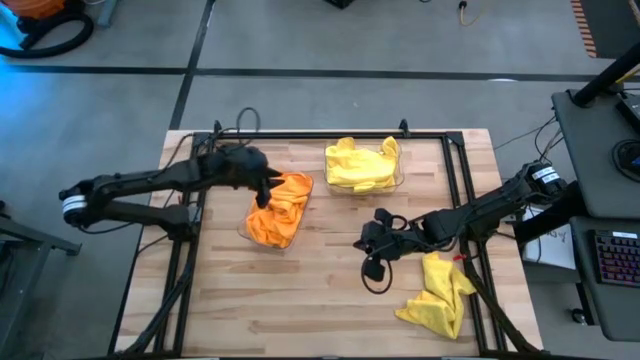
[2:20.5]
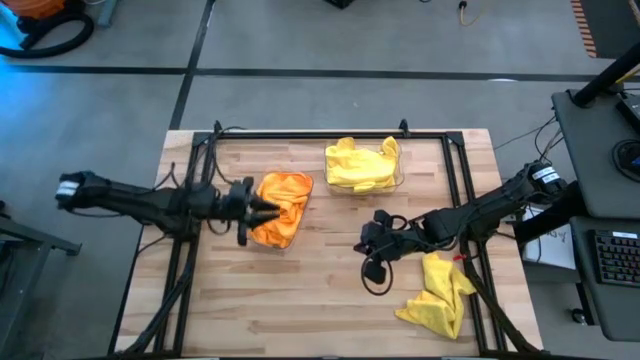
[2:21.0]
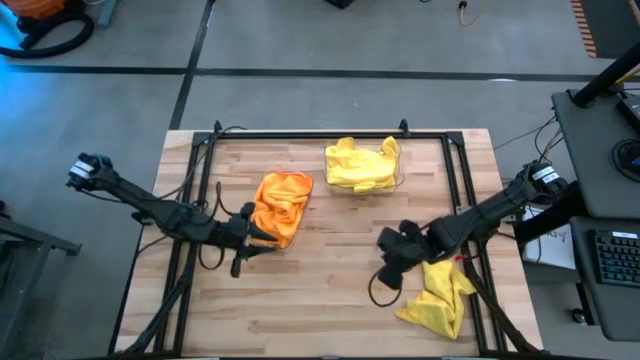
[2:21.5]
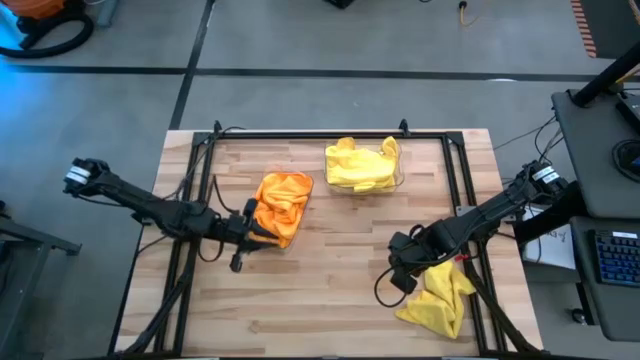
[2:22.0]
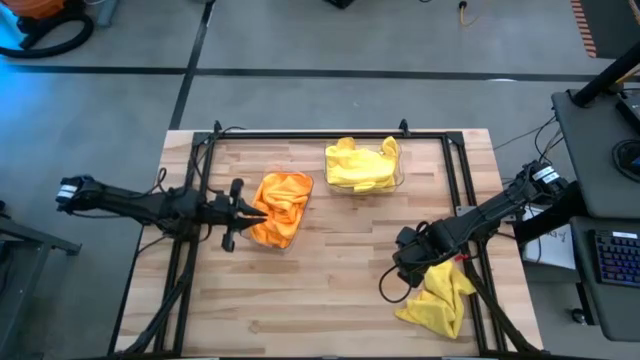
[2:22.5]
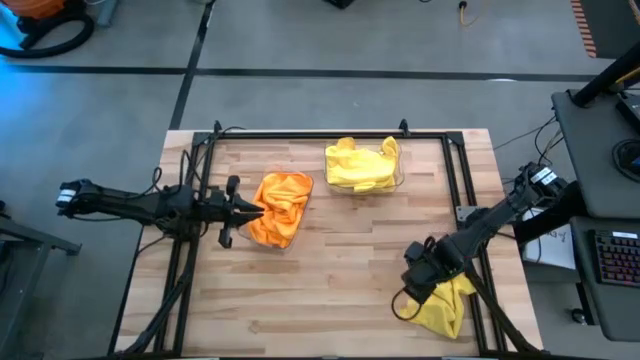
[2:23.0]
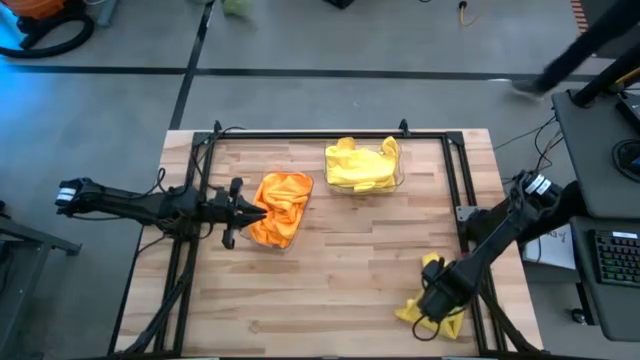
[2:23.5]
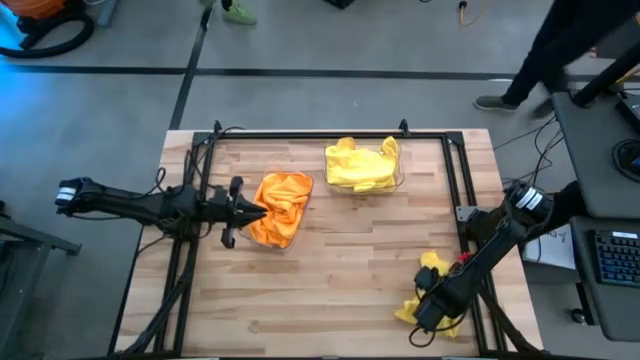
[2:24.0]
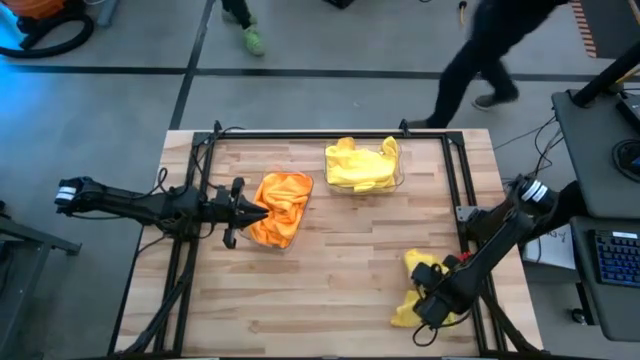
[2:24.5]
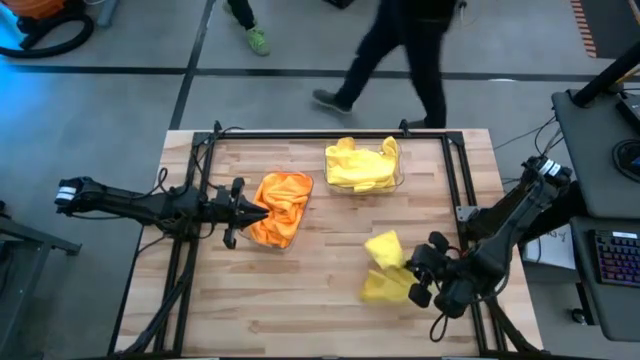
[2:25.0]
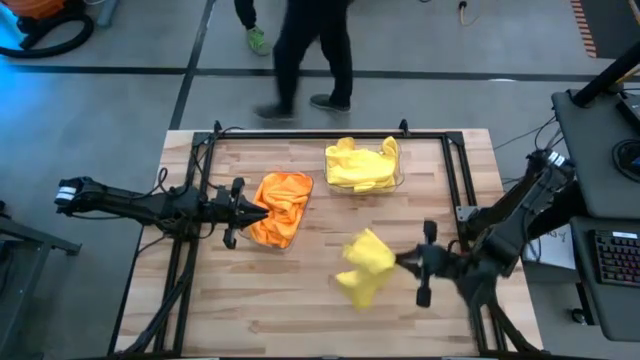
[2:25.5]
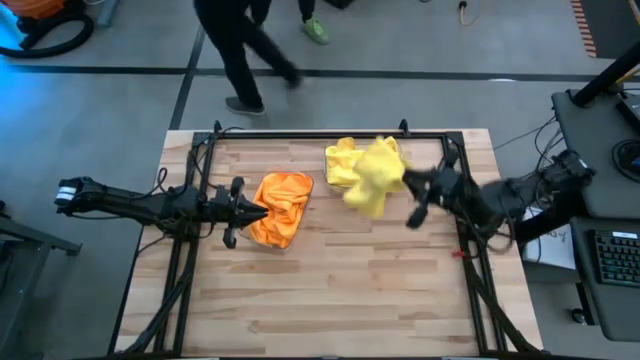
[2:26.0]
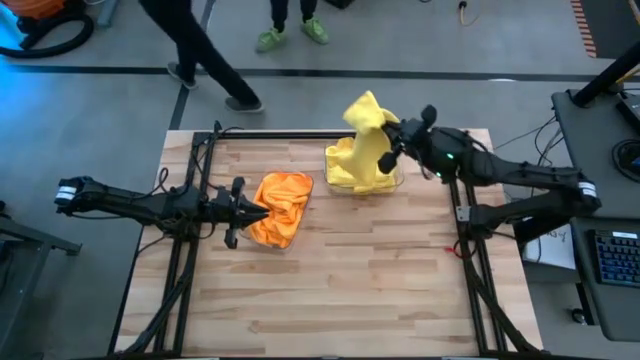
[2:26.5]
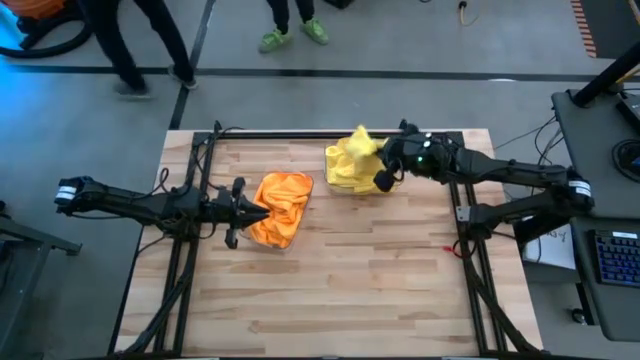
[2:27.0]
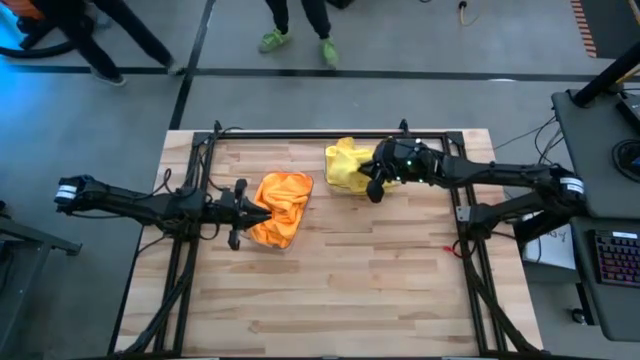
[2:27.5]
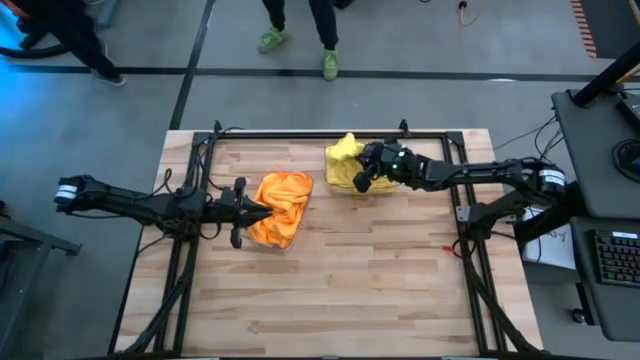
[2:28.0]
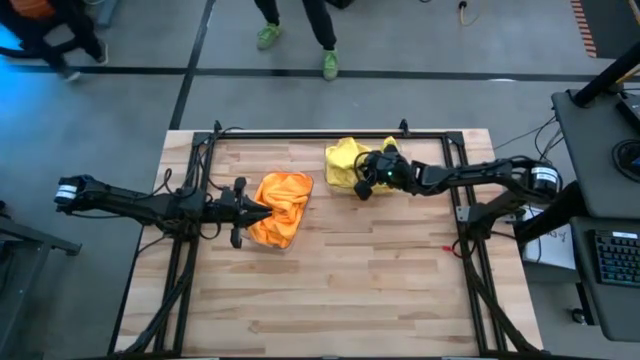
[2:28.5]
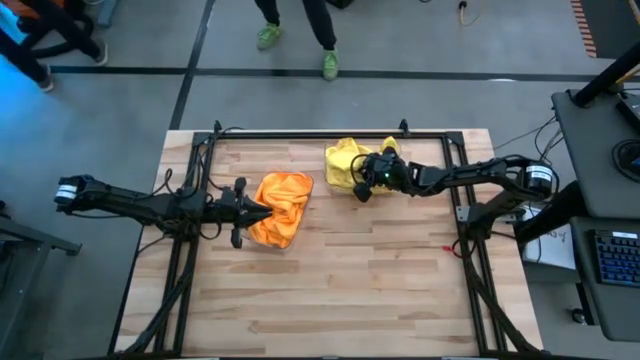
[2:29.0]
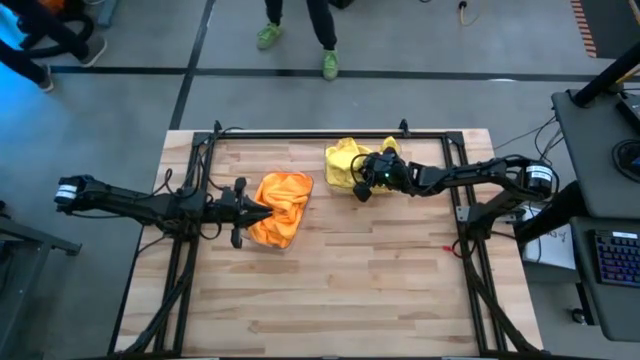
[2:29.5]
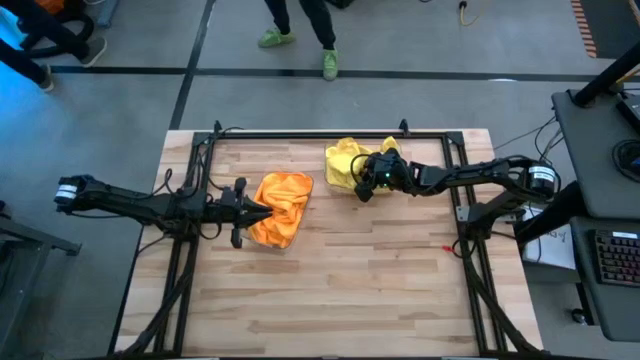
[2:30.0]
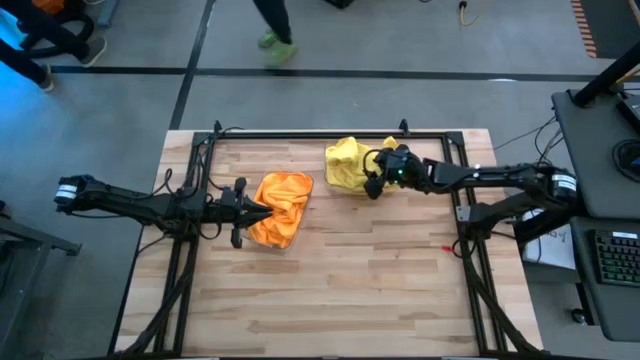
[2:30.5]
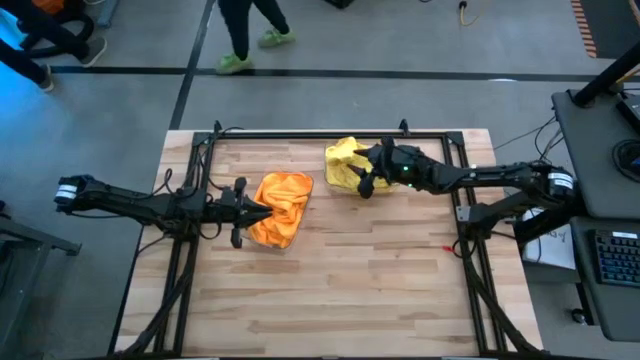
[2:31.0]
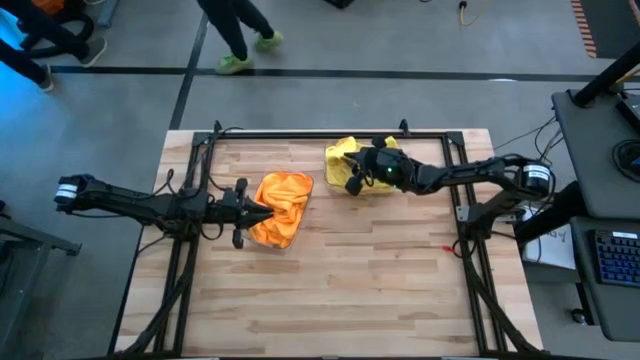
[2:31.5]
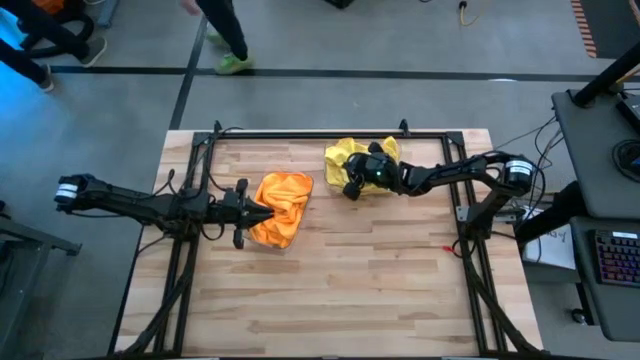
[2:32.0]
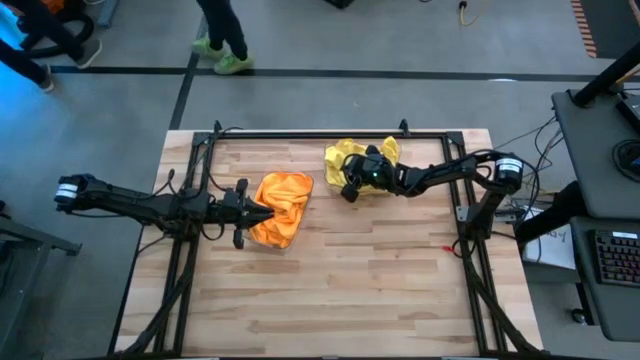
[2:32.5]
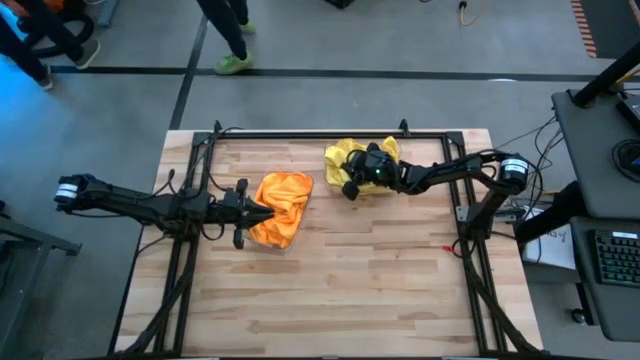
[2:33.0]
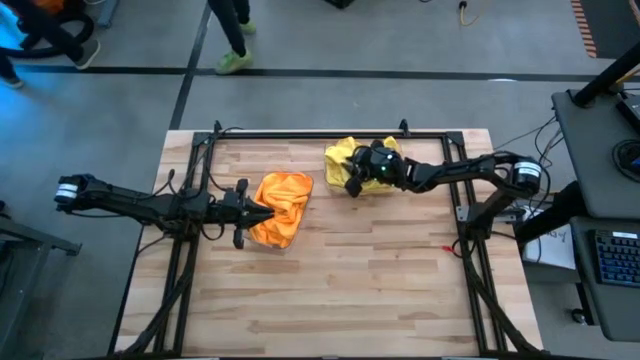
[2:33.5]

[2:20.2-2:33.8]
Task: Sort microfiber towel by color & place in baskets
Put the yellow microfiber towel into the top right transparent bin

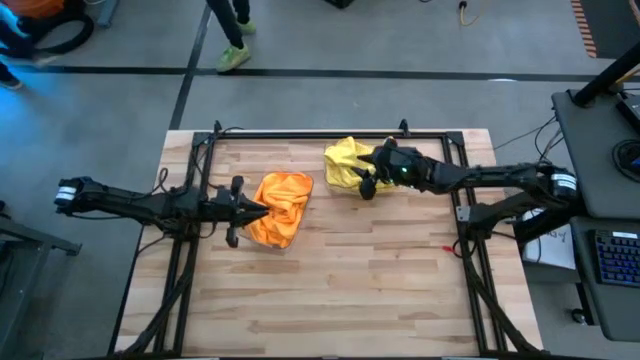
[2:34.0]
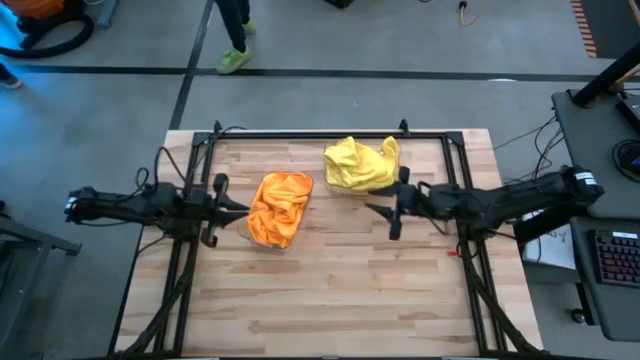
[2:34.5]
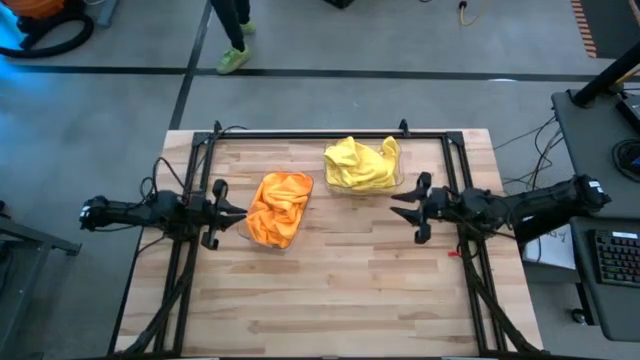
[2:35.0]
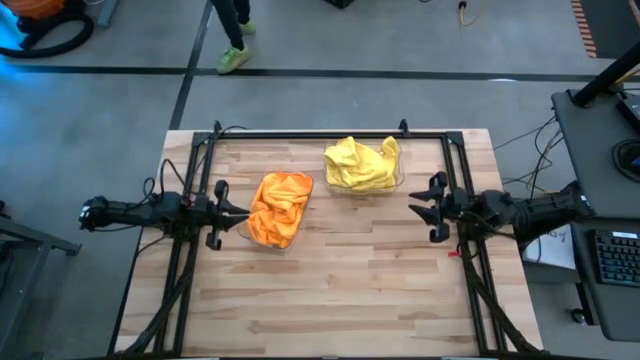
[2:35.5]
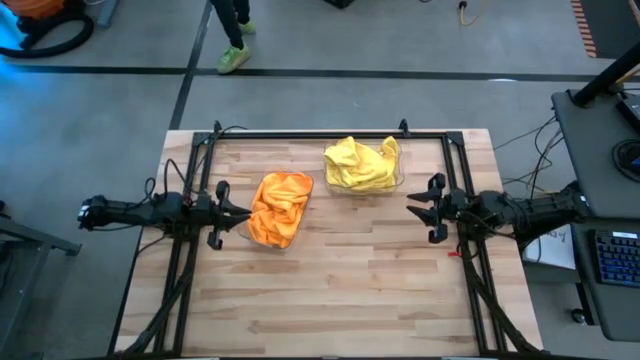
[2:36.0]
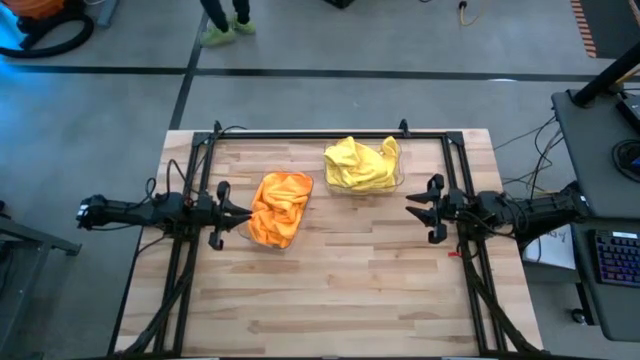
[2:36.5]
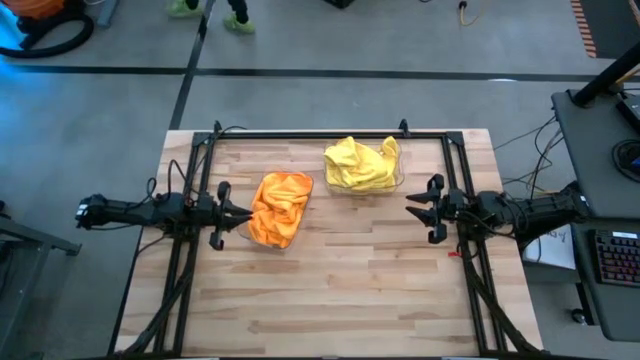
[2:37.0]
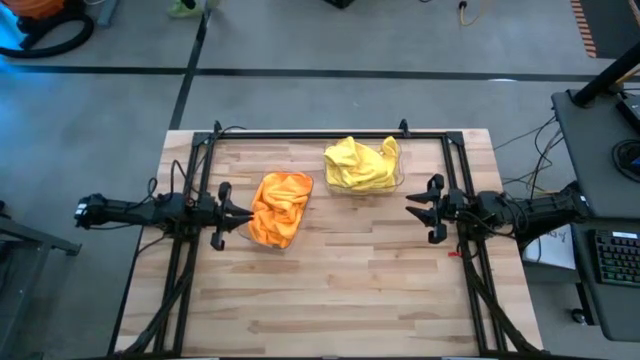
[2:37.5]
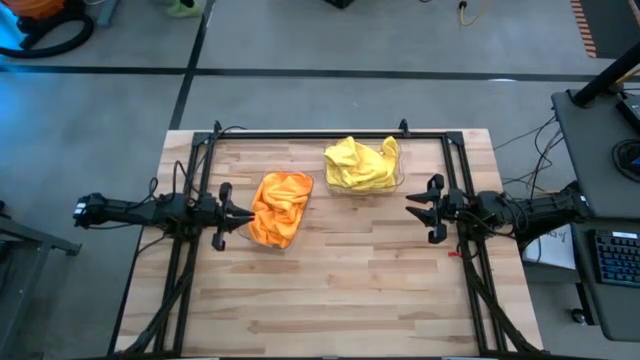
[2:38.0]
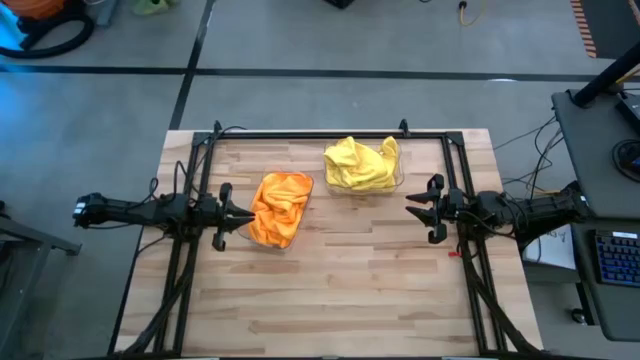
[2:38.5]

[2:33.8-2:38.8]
Return to Home Position

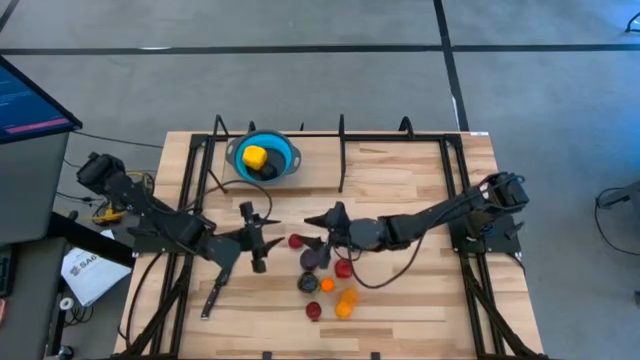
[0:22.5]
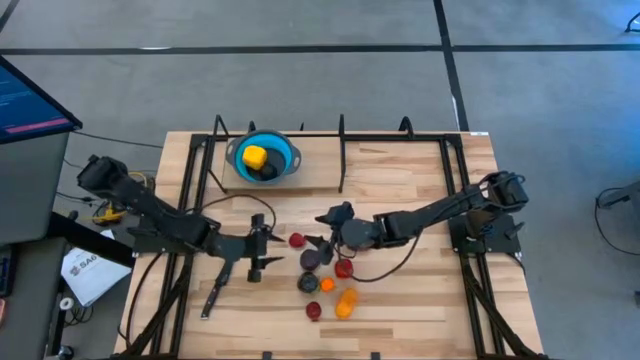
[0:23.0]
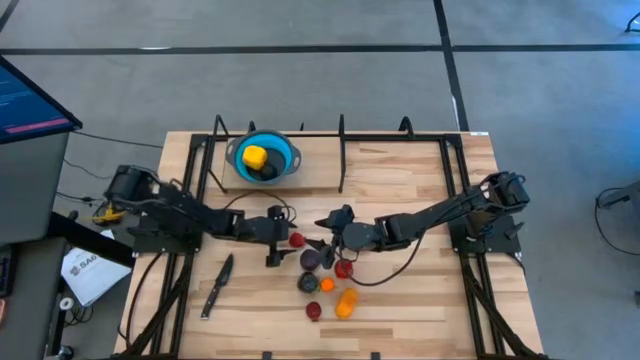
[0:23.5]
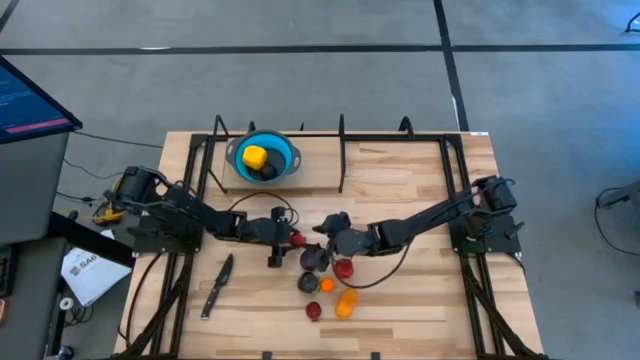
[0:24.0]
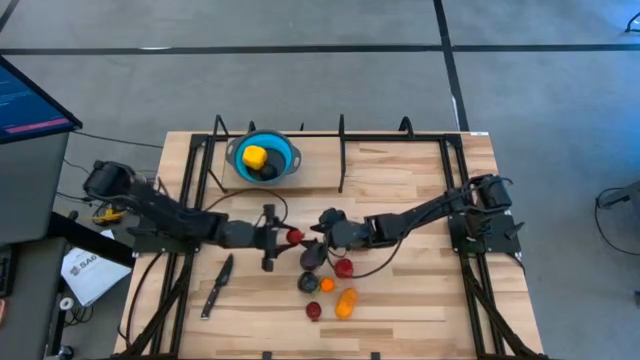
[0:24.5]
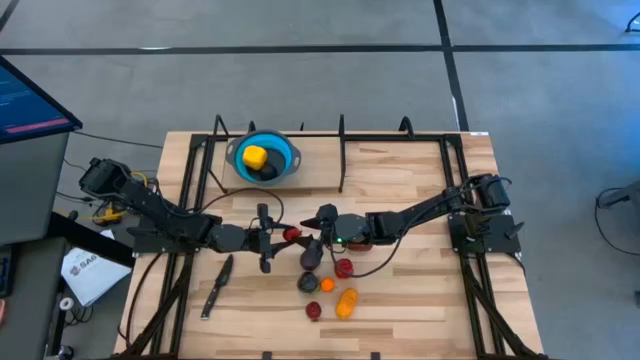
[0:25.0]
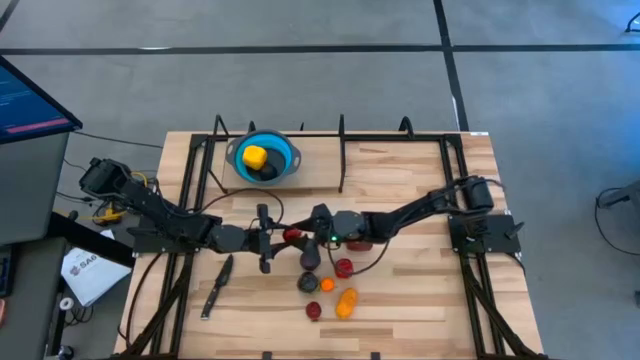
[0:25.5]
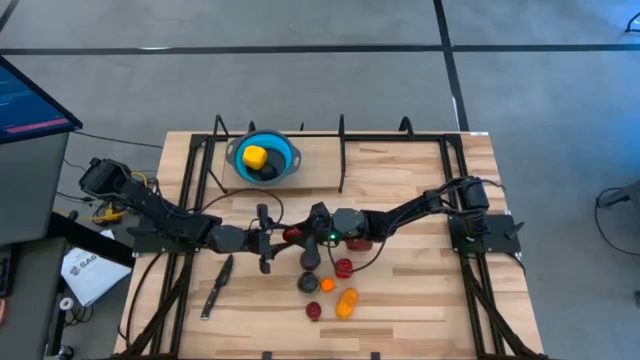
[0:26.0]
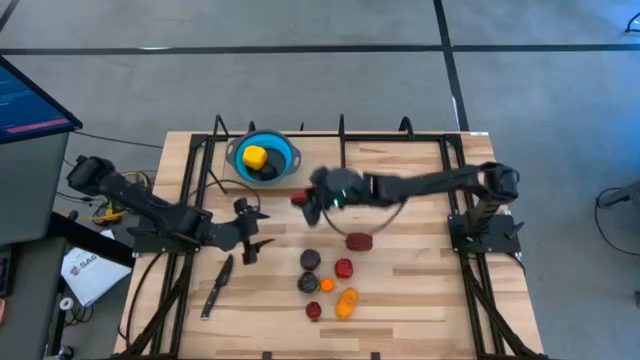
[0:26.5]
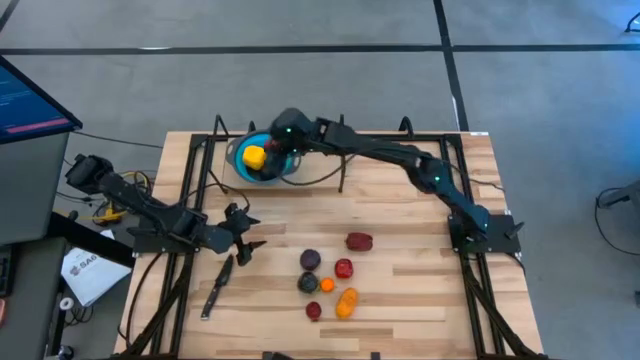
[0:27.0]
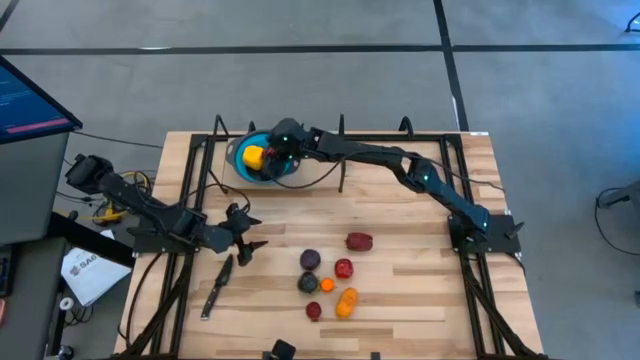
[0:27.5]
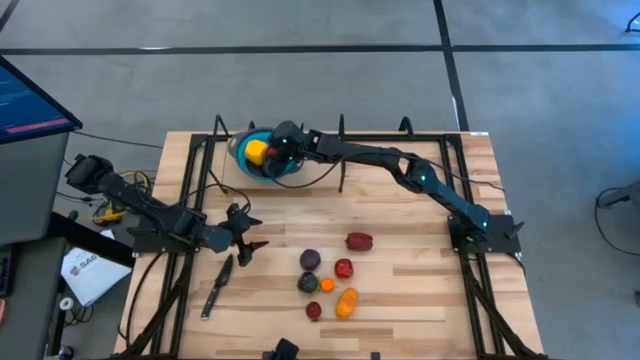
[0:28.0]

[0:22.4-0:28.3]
Task: Pick & Place Fruit
Put the top pomegranate in the blue strainer bowl on the shelf
